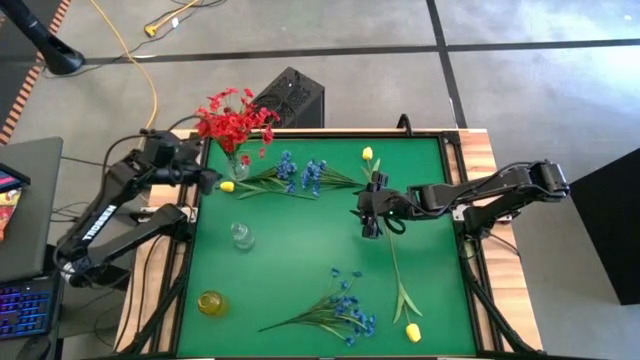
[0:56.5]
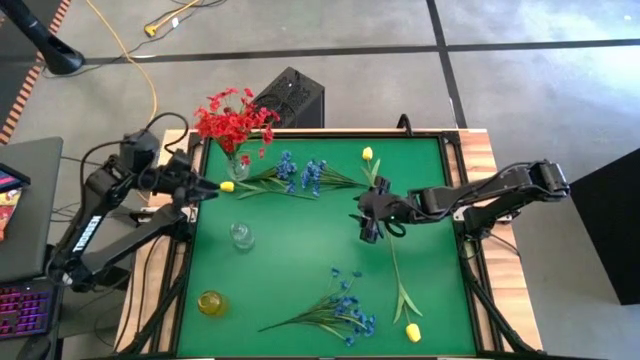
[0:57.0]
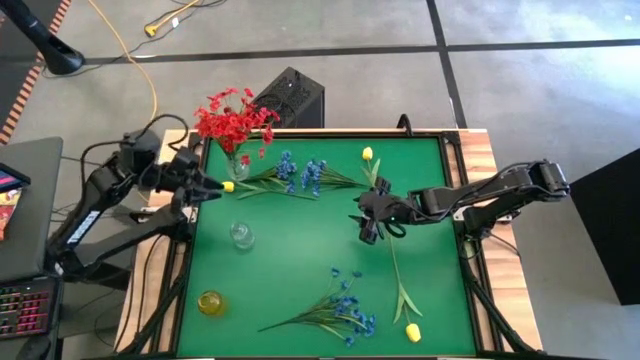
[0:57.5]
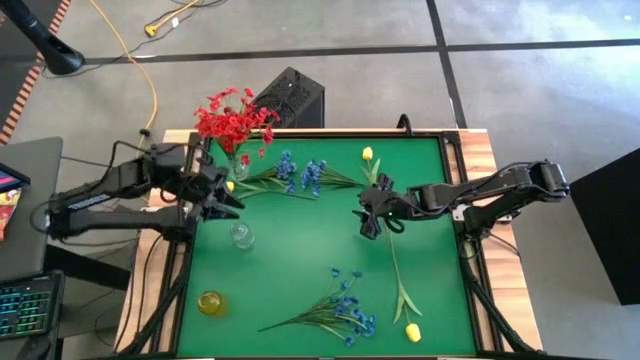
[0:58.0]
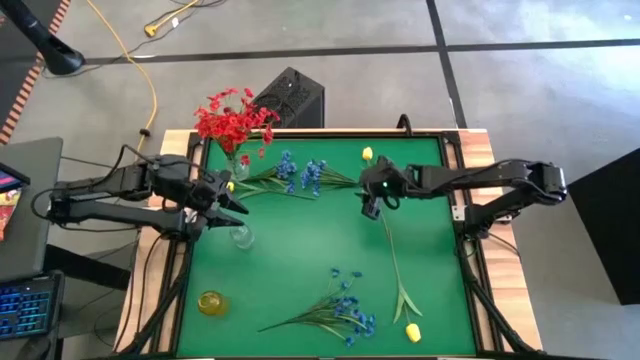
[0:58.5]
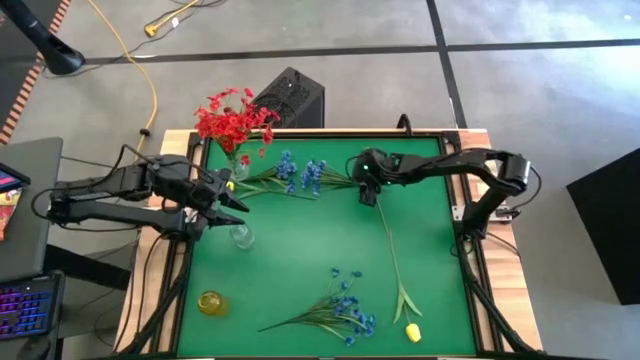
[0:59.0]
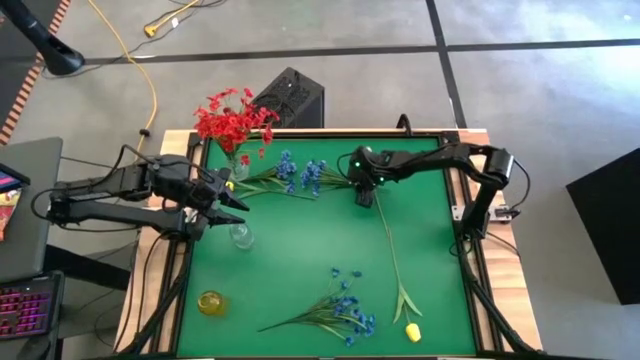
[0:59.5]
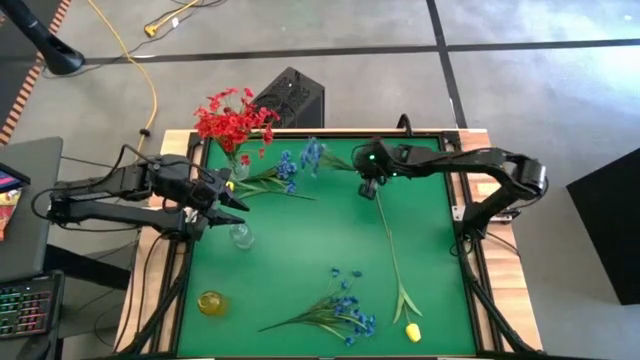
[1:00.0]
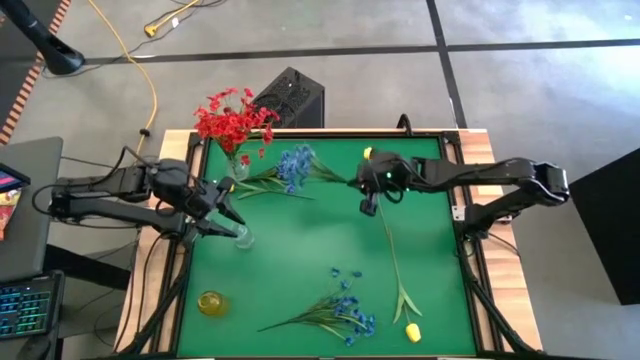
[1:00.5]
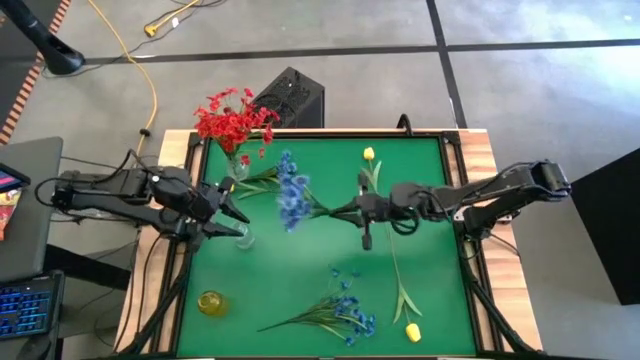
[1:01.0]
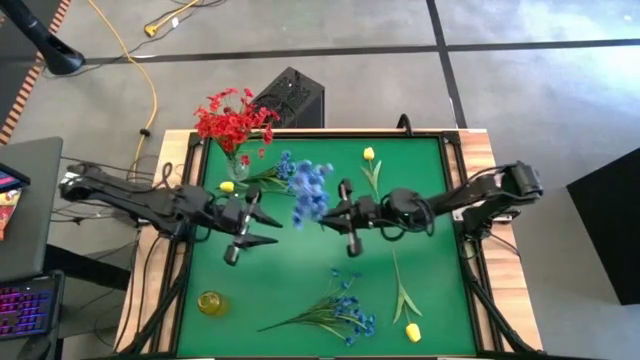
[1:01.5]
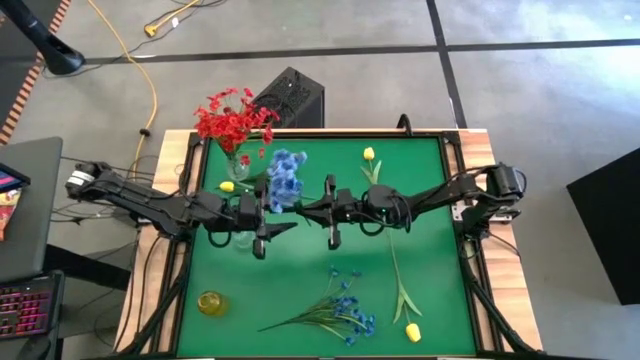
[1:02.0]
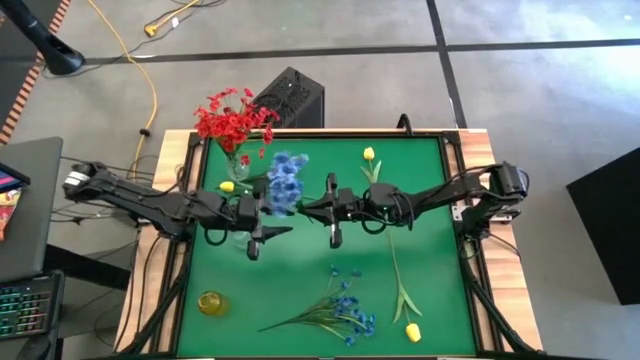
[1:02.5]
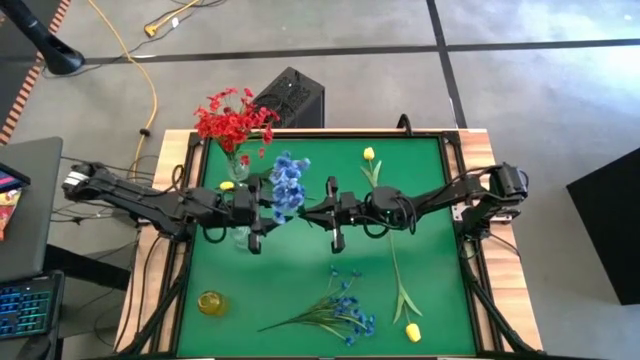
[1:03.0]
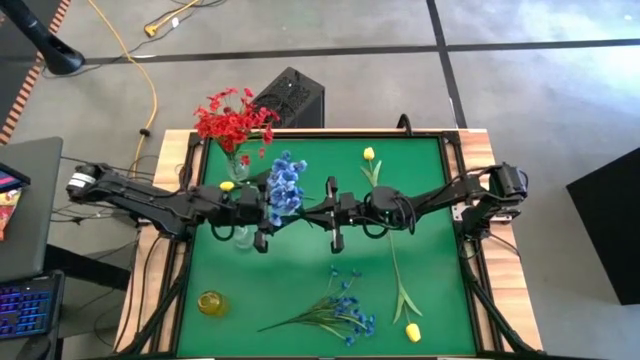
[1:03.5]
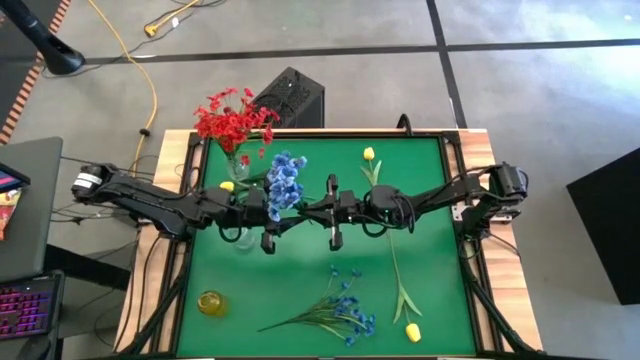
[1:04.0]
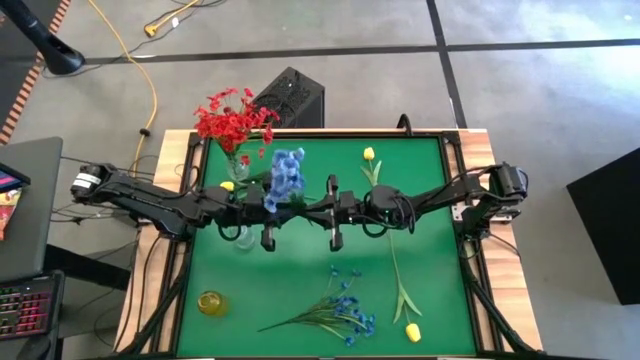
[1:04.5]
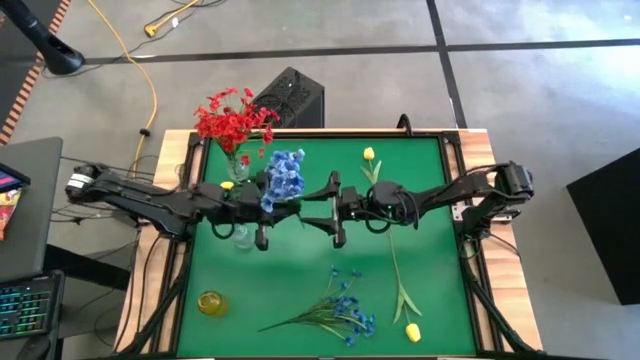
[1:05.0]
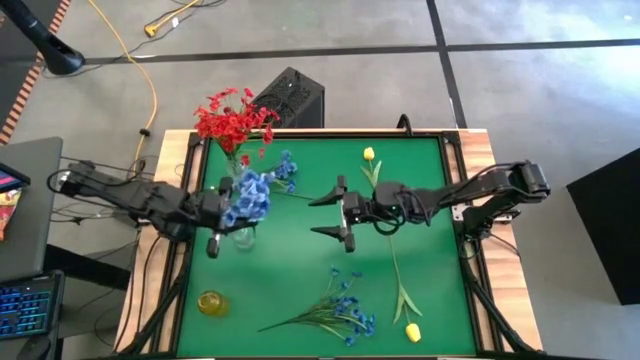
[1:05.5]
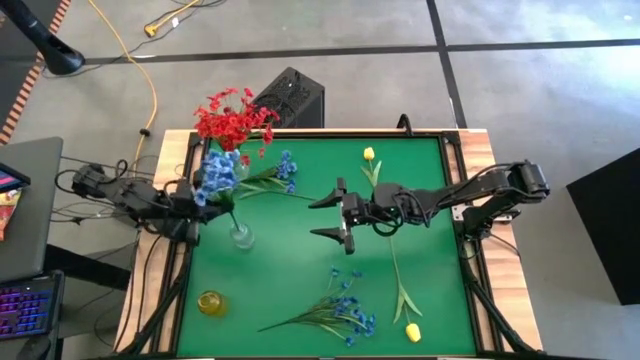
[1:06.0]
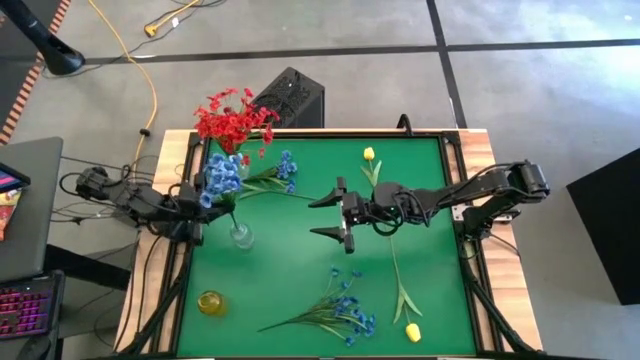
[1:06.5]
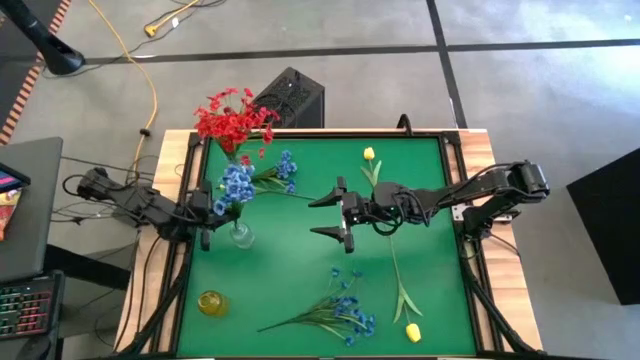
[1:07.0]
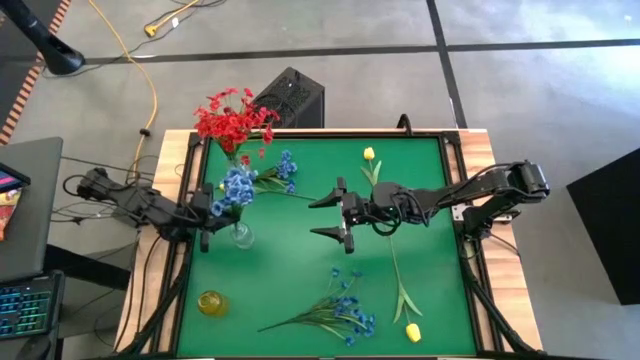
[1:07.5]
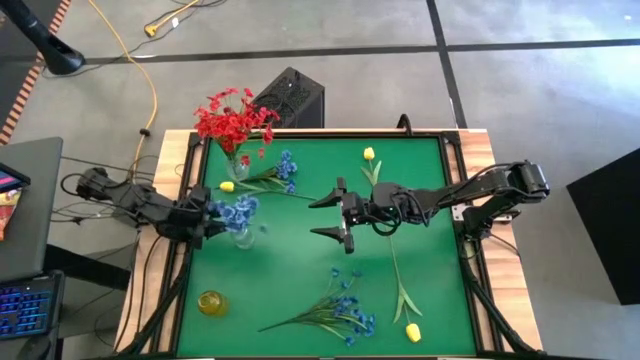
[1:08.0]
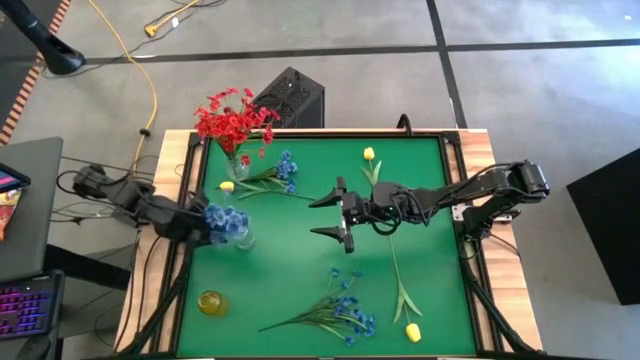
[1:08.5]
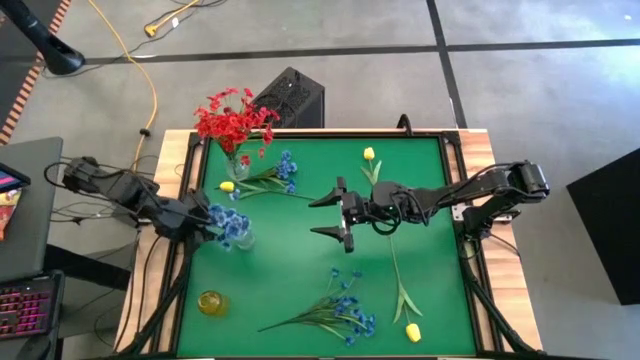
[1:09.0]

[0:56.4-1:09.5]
Task: Sort flowers into vase by color
Put the top right blue flowers into the bottom transparent vase
